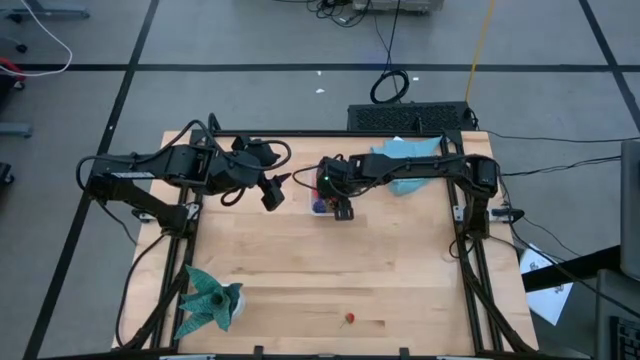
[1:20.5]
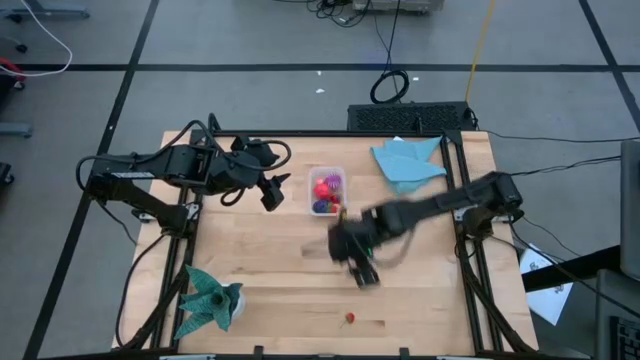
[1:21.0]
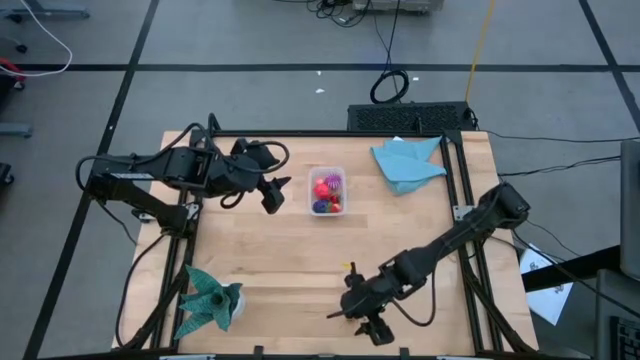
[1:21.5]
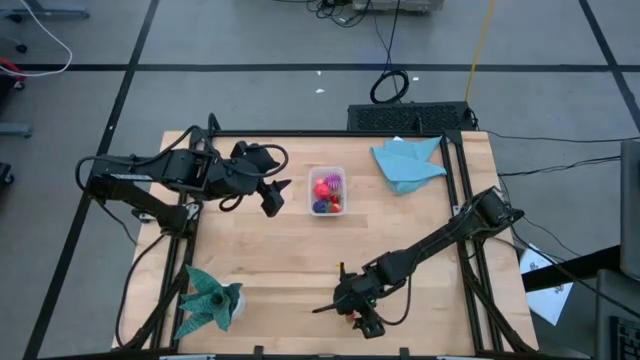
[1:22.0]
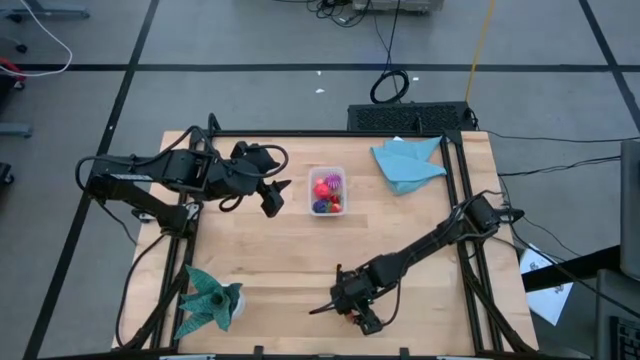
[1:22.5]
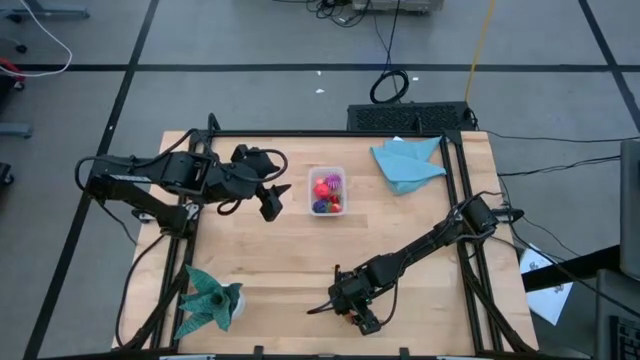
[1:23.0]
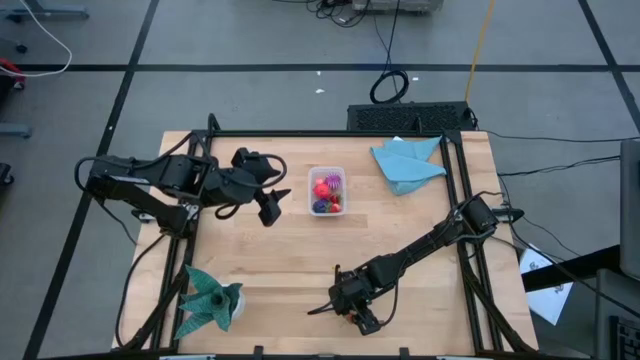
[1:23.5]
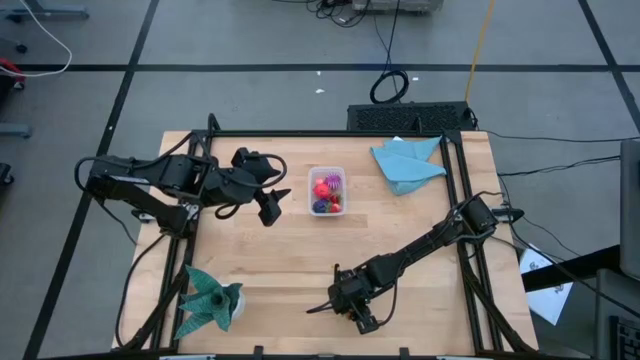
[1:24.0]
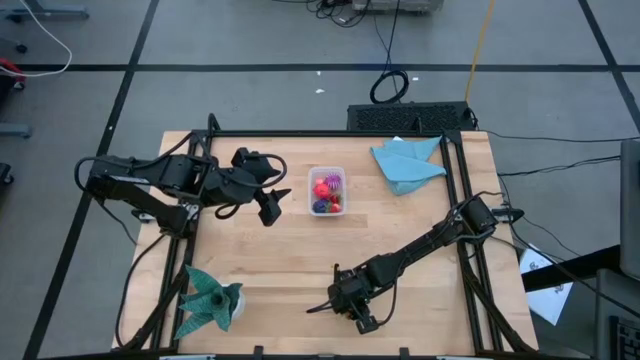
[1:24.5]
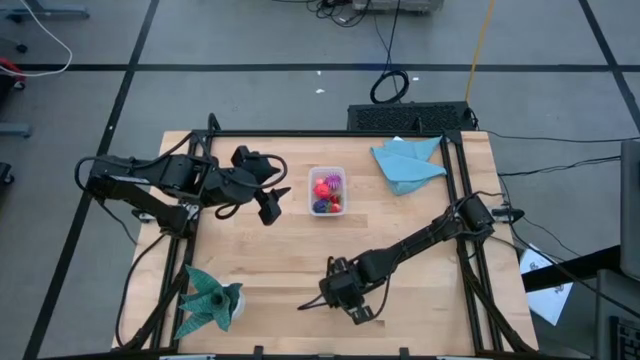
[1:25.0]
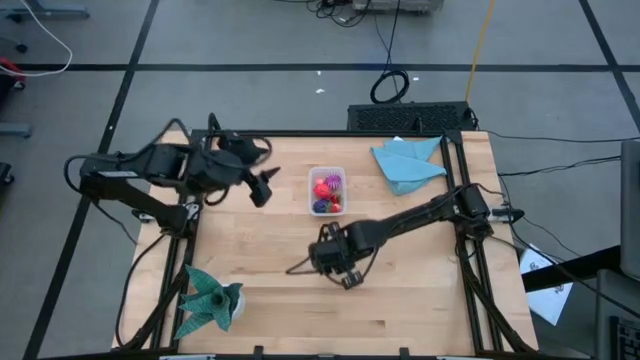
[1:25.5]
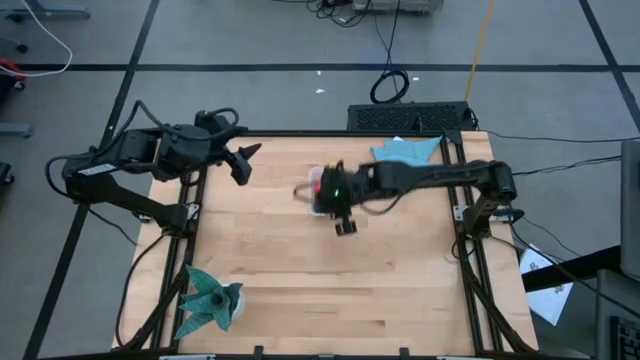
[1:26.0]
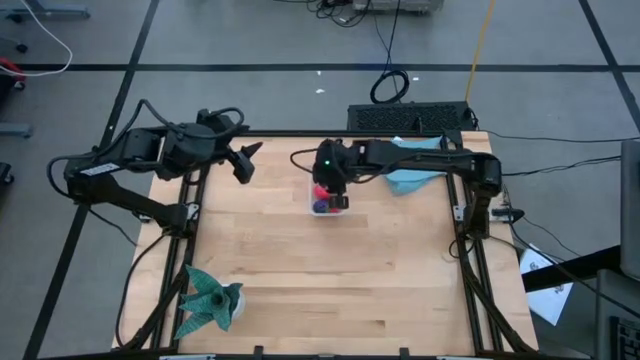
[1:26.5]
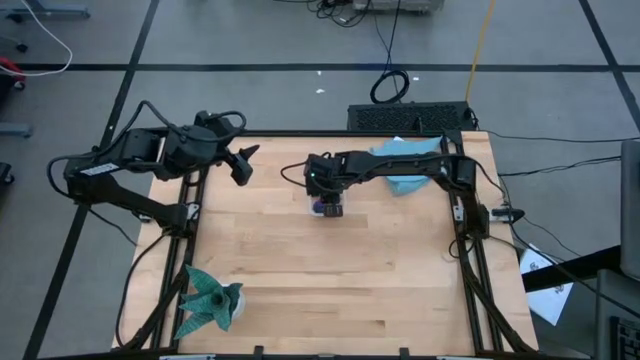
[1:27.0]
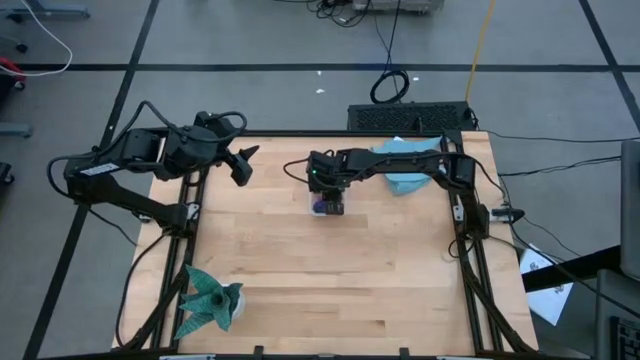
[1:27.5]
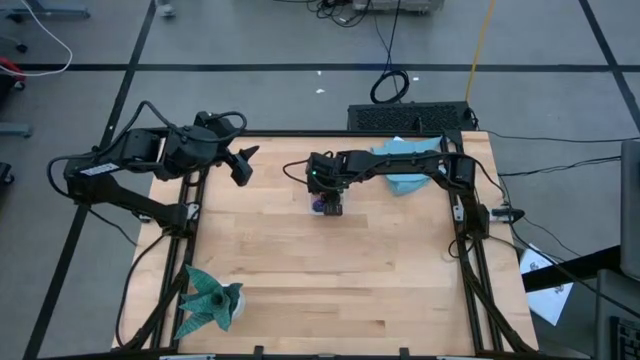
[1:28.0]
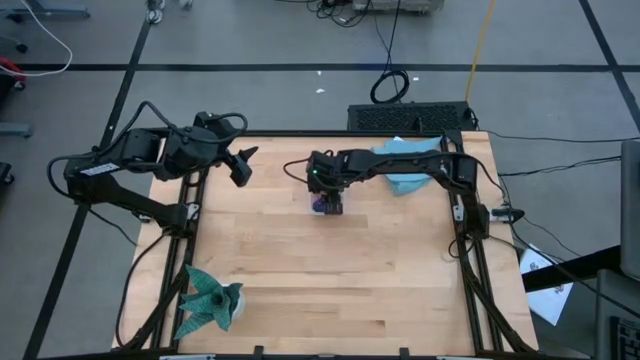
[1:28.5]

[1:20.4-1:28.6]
Task: Pick and placing Produce into tupperware
Put the red strawberry into the transparent bin

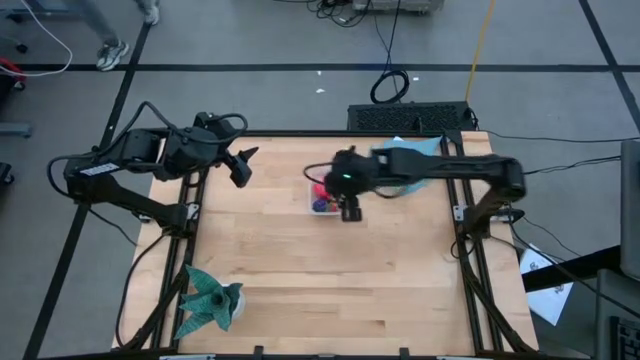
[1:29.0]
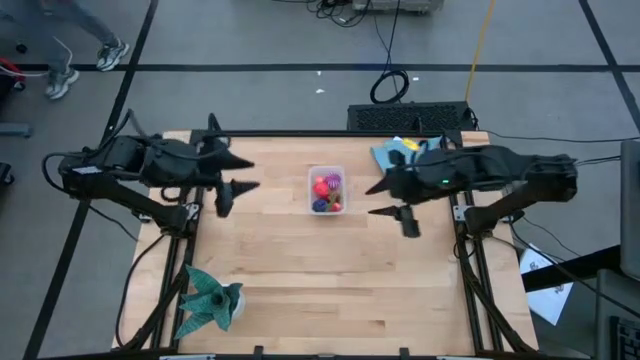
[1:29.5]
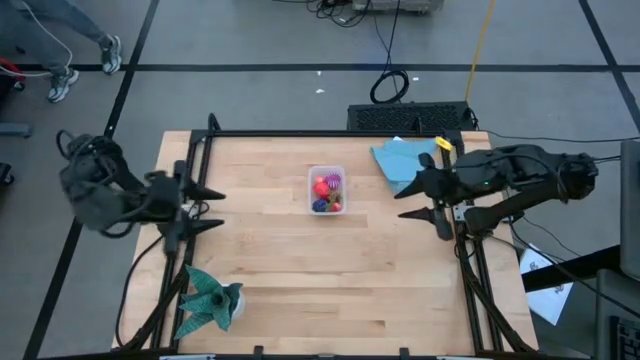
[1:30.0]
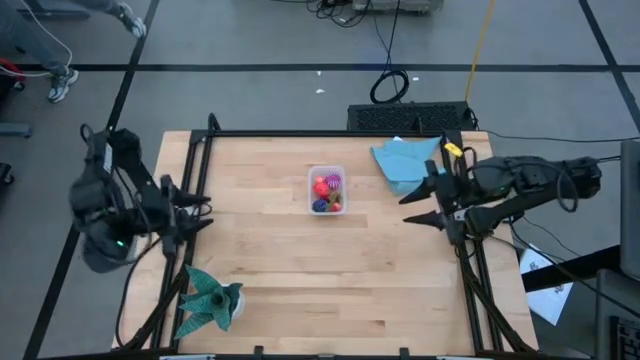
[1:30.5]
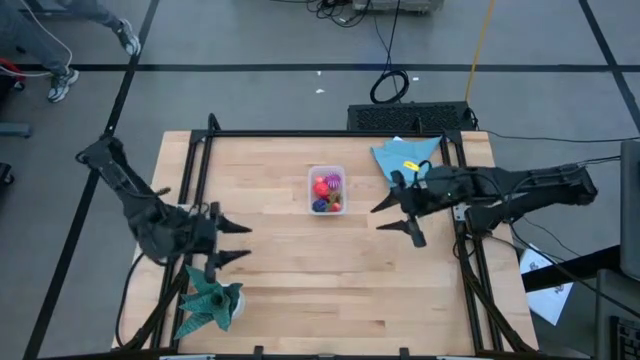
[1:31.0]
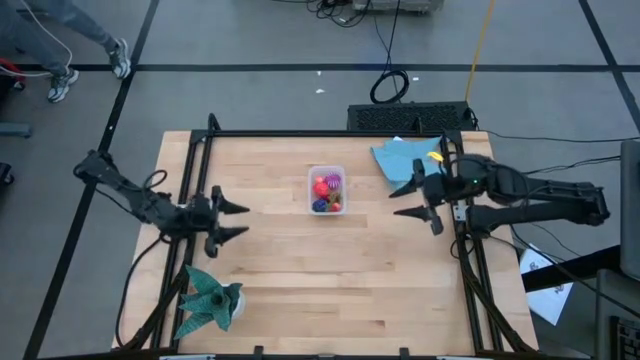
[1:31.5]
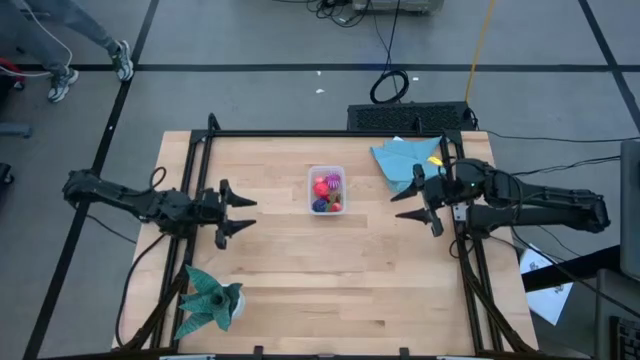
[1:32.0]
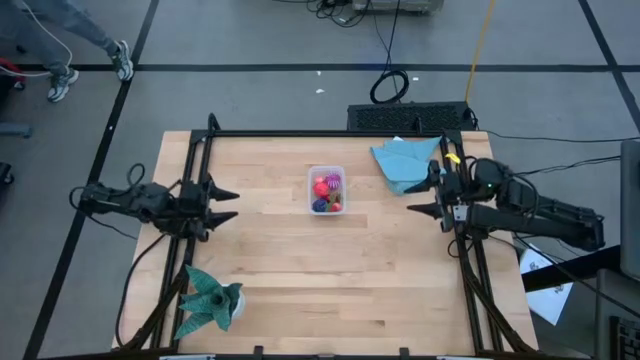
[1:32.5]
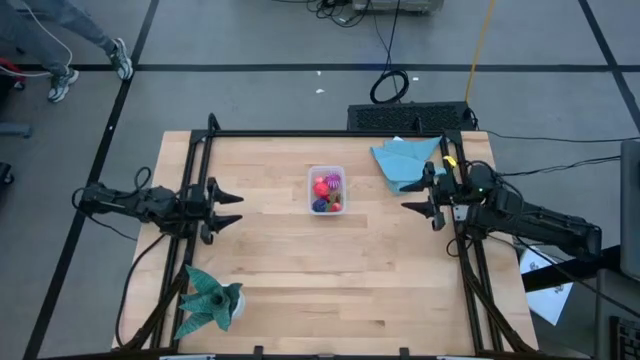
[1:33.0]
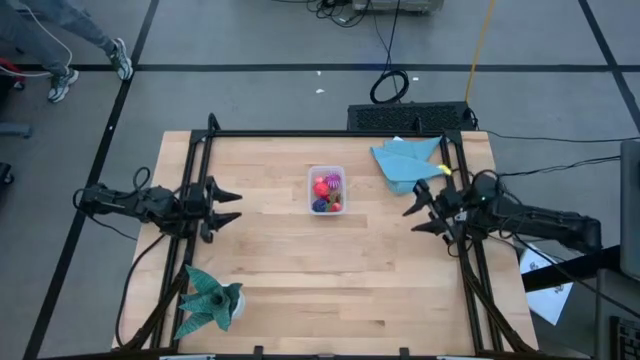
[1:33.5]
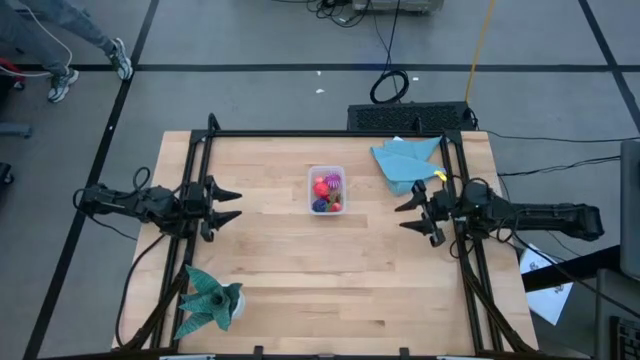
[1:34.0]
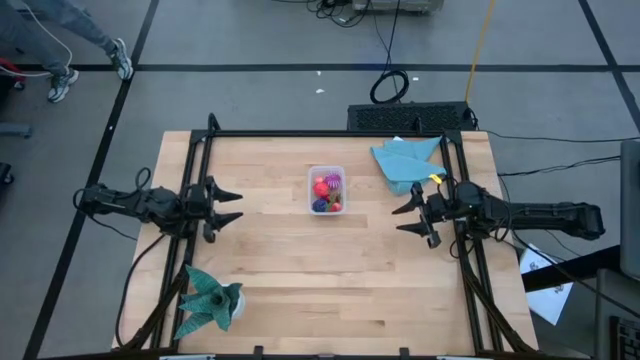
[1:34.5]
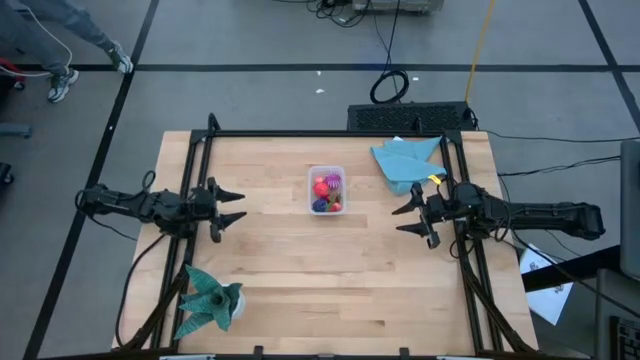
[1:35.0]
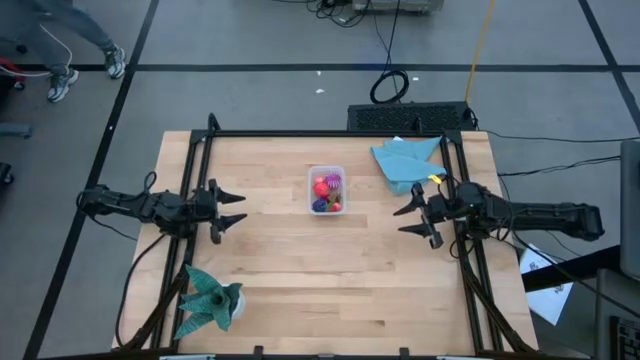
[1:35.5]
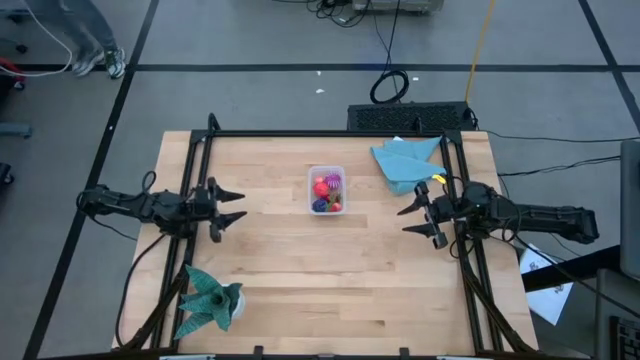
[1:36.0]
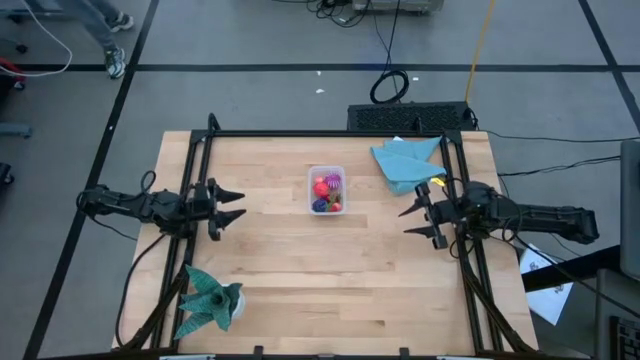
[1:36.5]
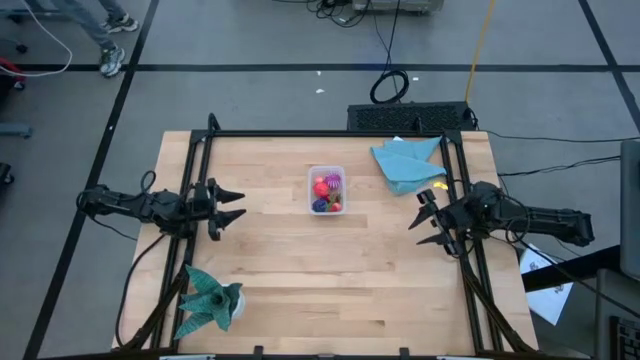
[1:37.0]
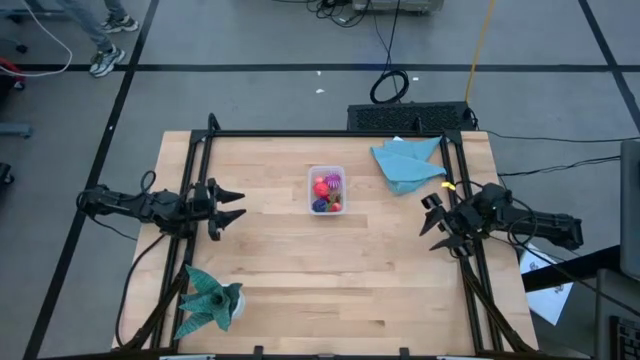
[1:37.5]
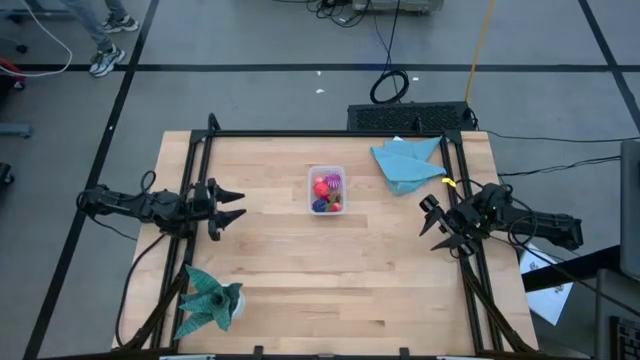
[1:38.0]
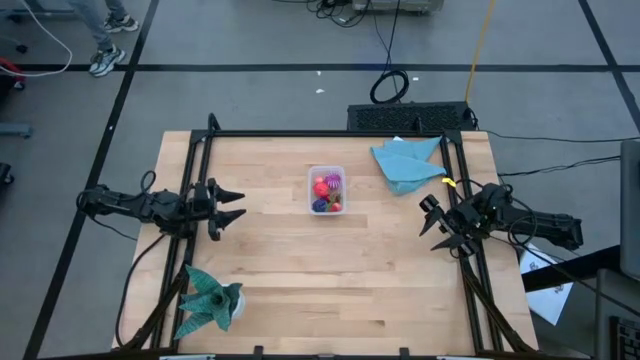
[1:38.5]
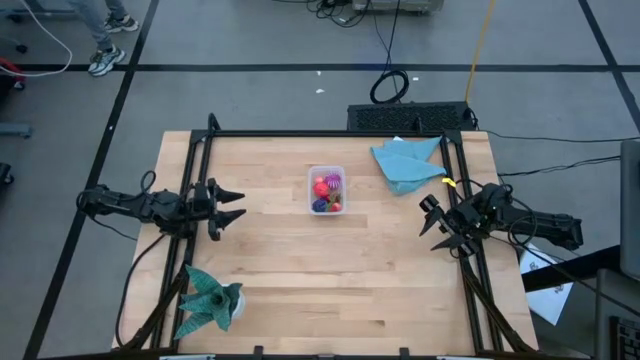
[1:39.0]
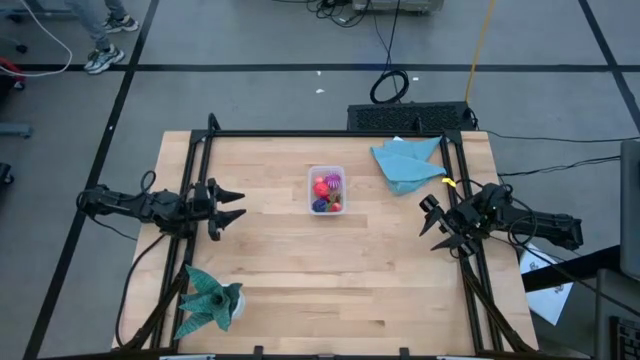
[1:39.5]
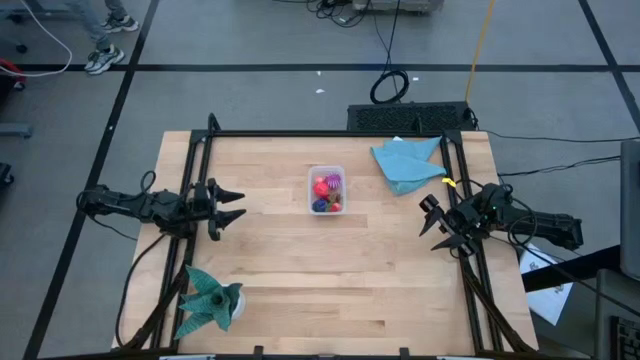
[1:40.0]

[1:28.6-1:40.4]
Return to Home Position

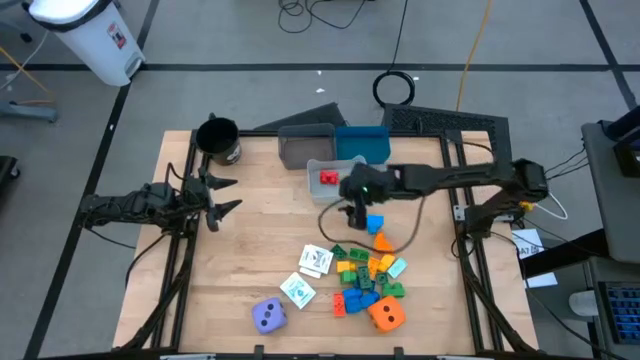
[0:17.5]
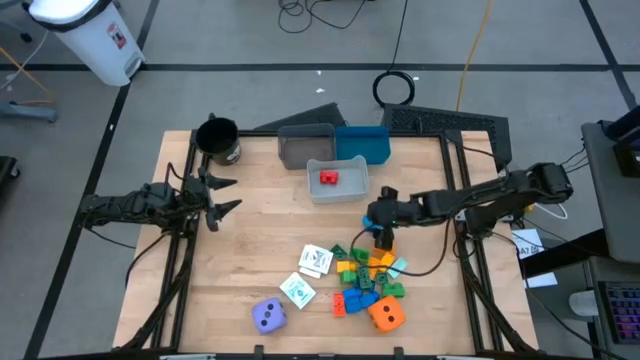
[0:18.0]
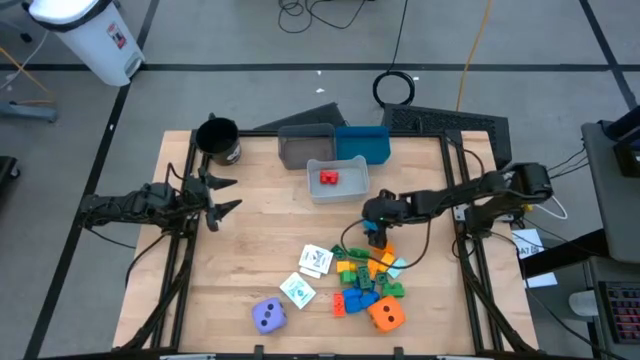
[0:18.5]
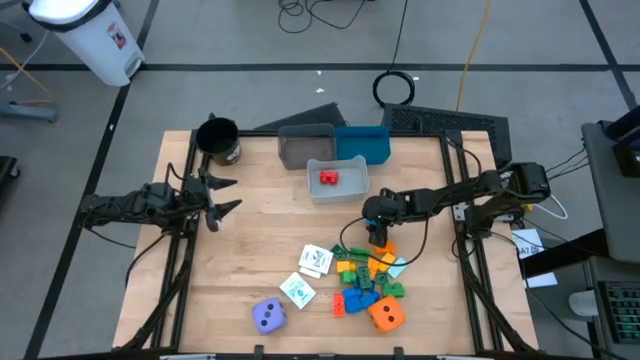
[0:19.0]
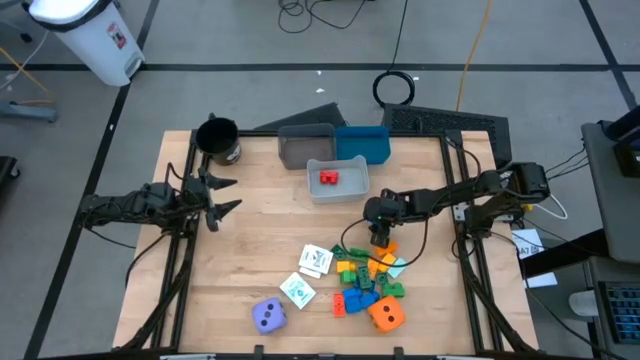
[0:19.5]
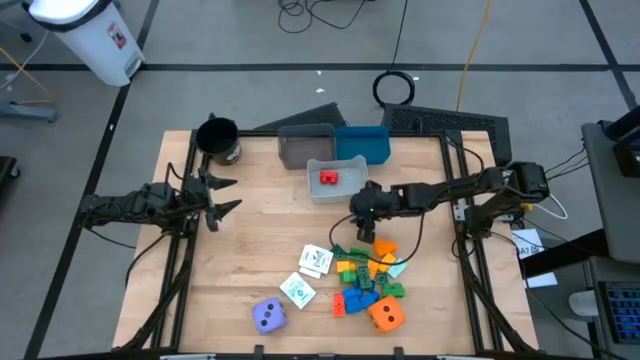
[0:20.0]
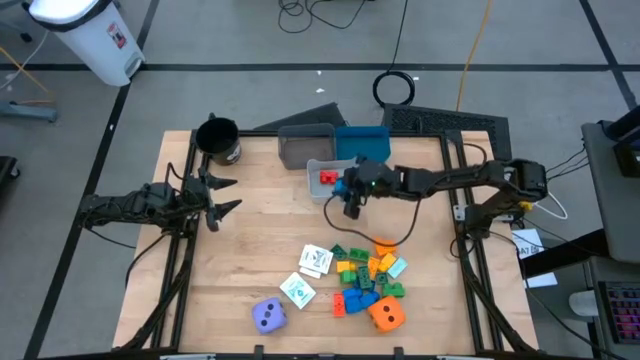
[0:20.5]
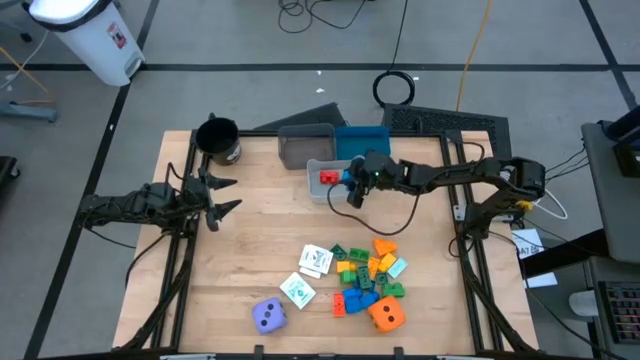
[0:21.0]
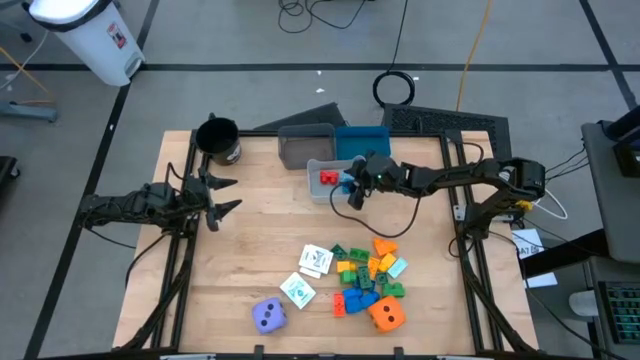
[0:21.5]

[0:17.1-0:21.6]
Task: Pick & Place Toys
Put the blue game piece into the gray bin
